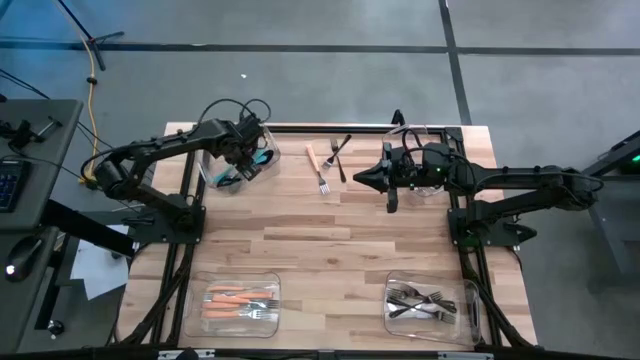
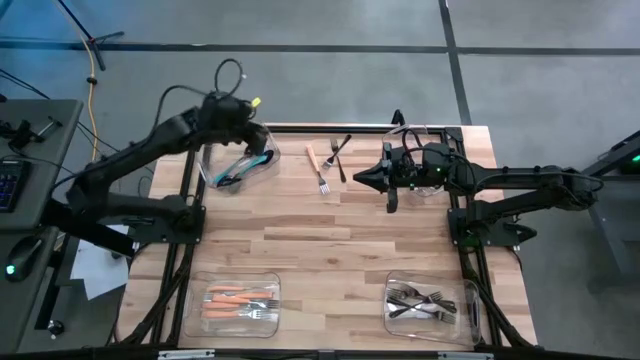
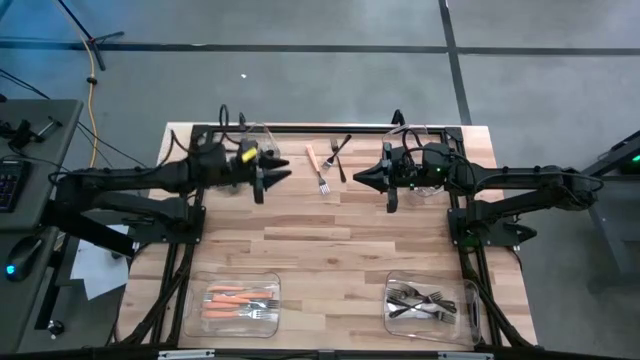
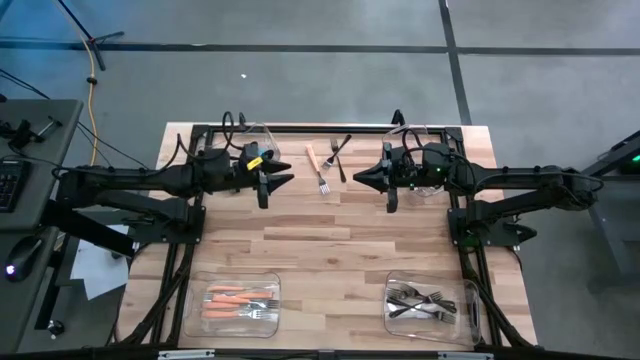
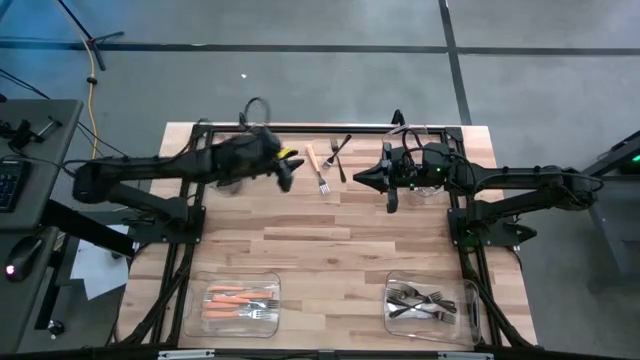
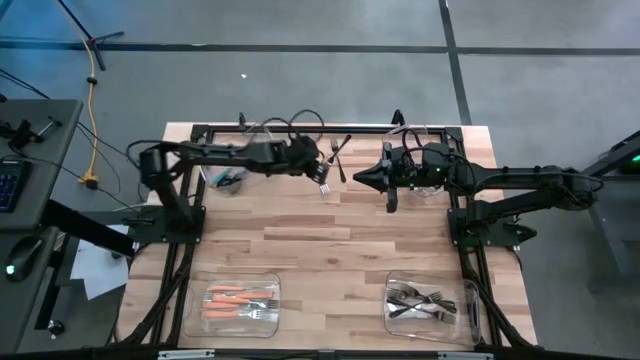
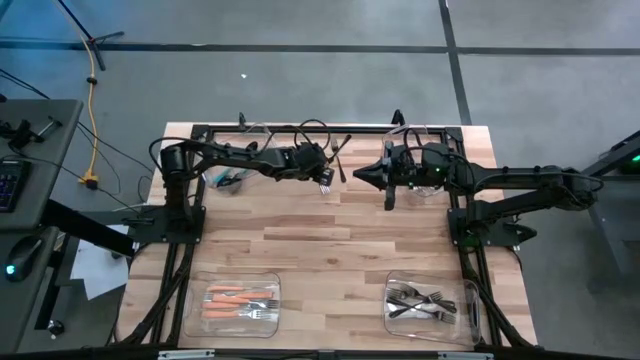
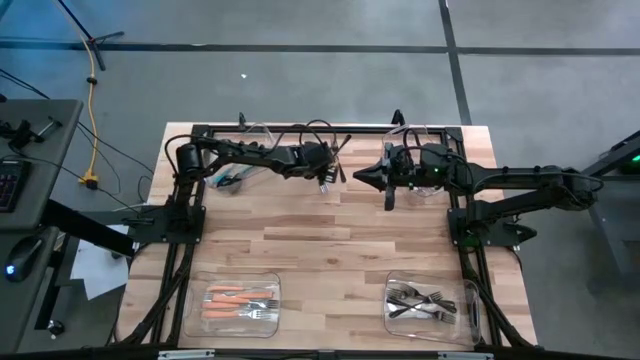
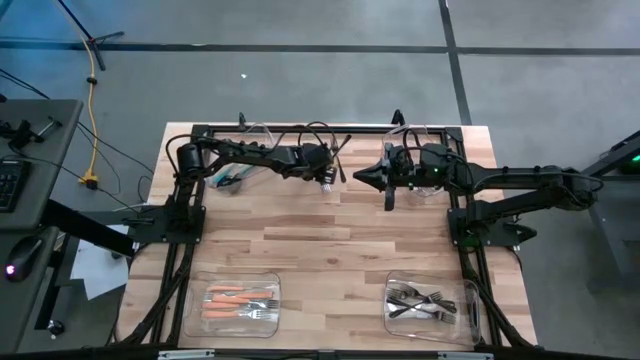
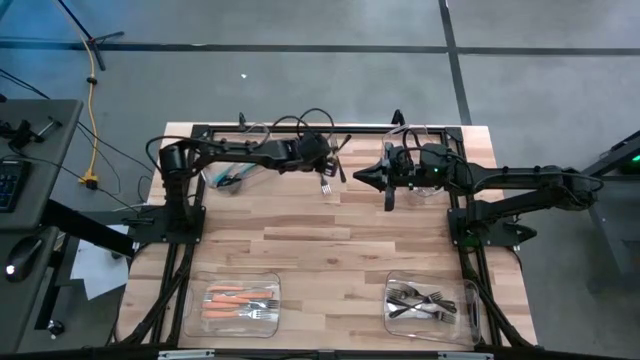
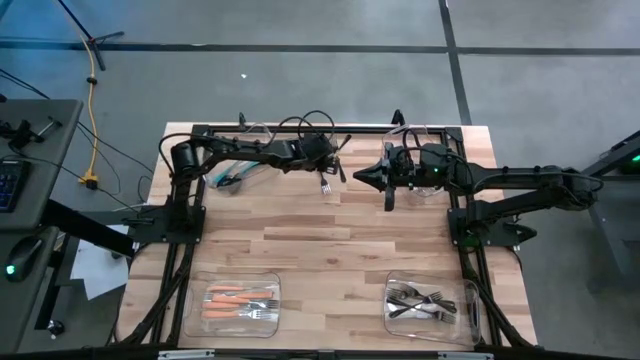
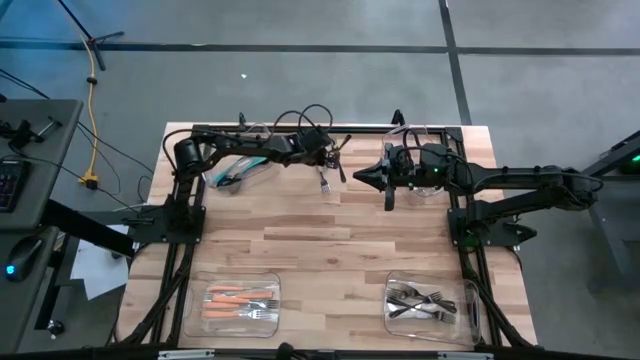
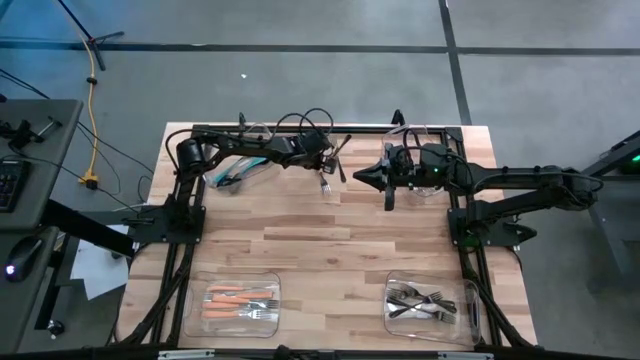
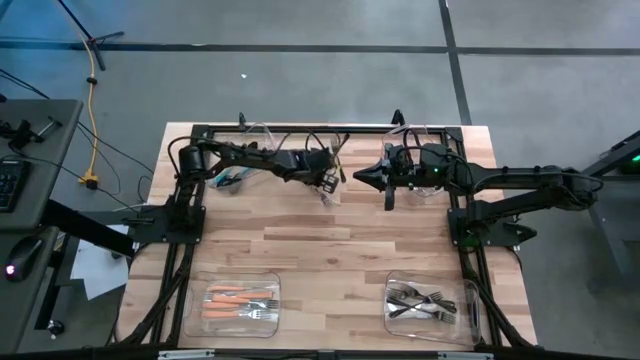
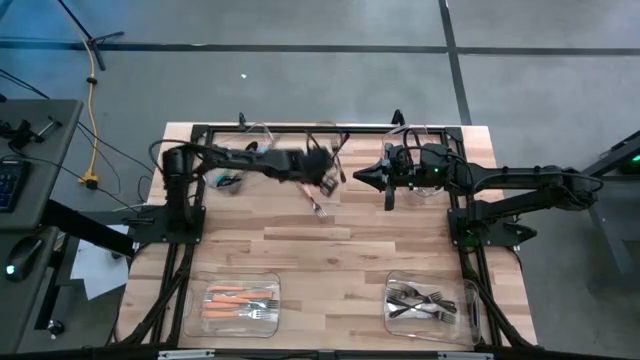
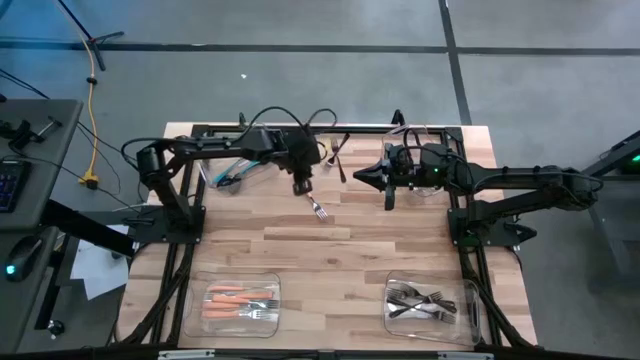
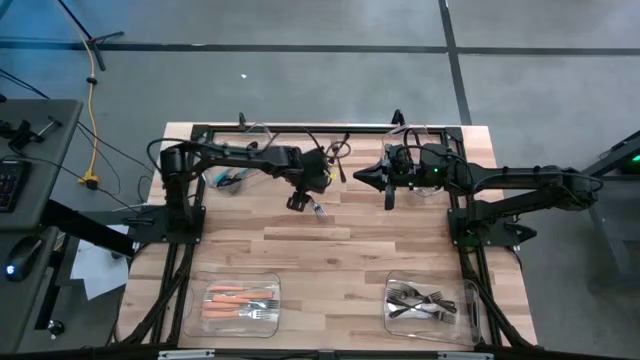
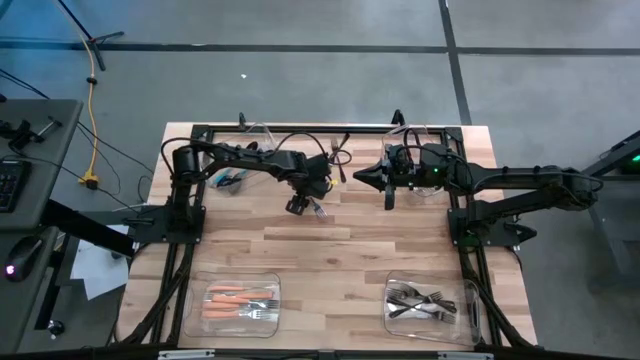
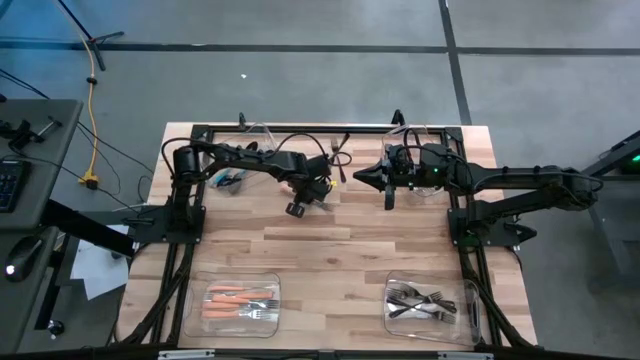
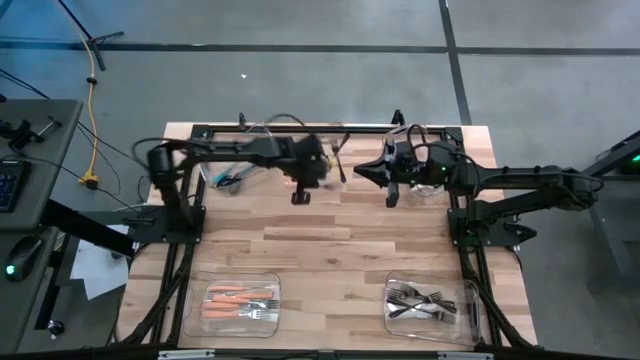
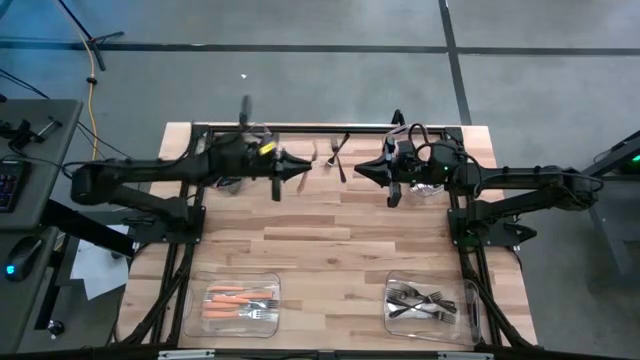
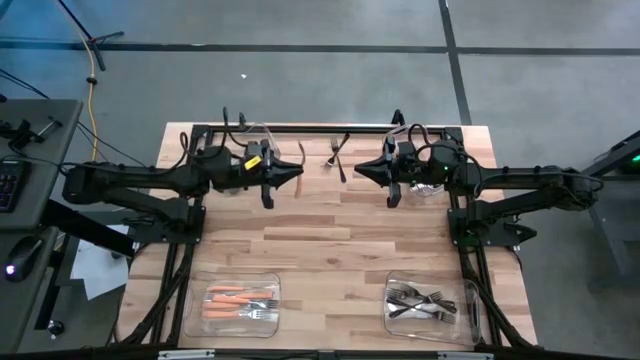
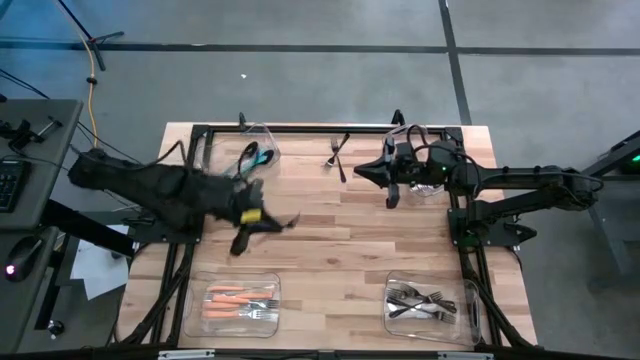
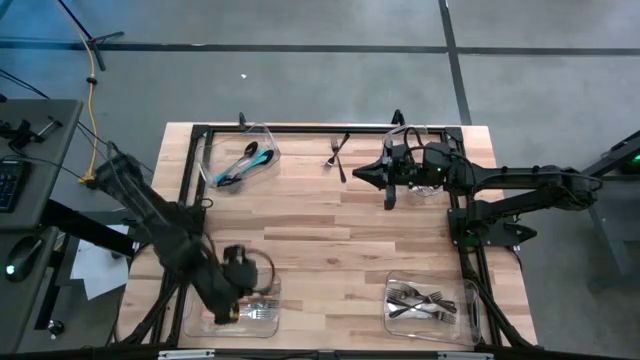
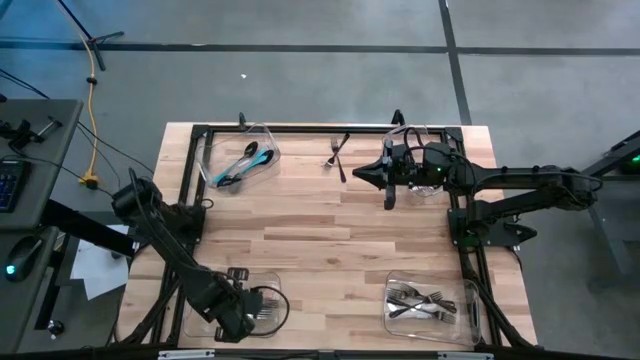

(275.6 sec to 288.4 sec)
Task: Sort silverware by color (type)
Put the light orange fork into the bottom left transparent bin

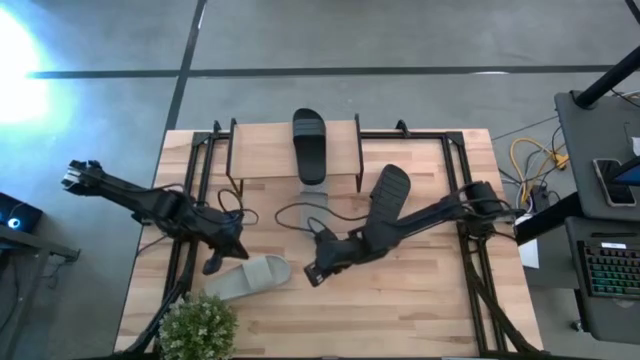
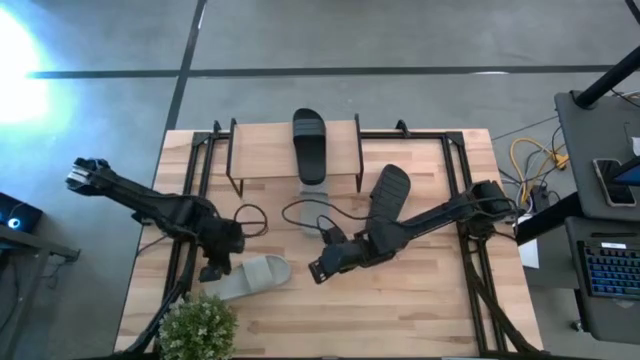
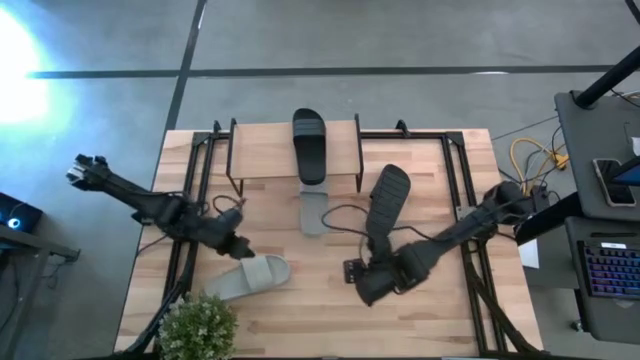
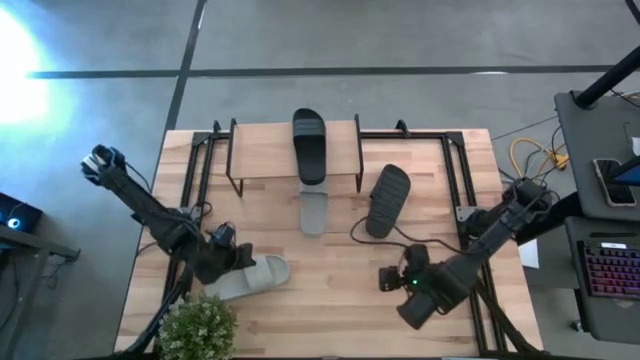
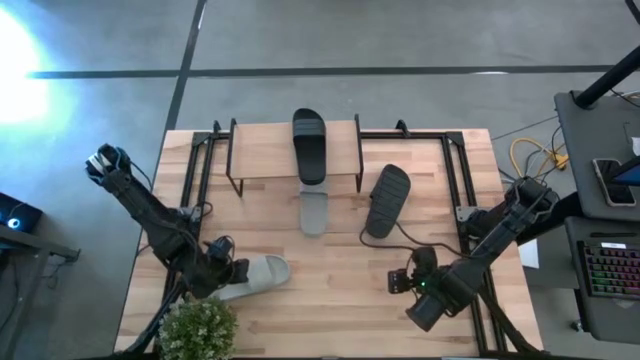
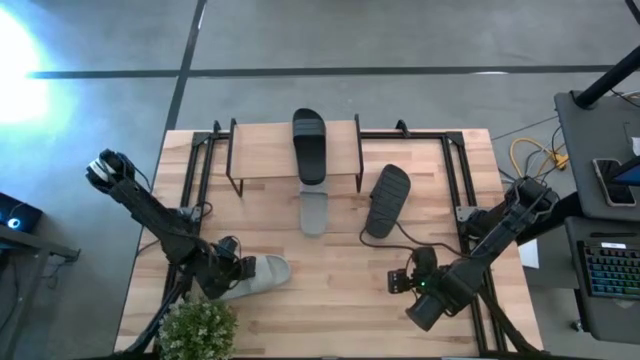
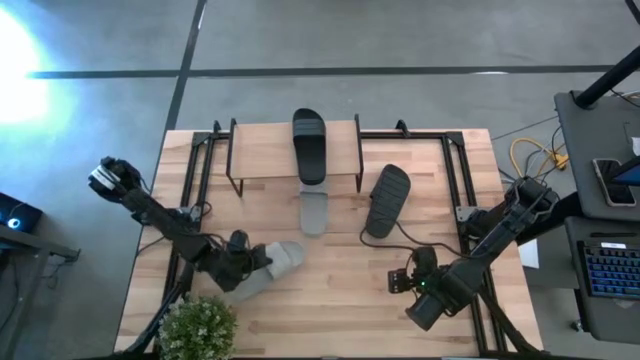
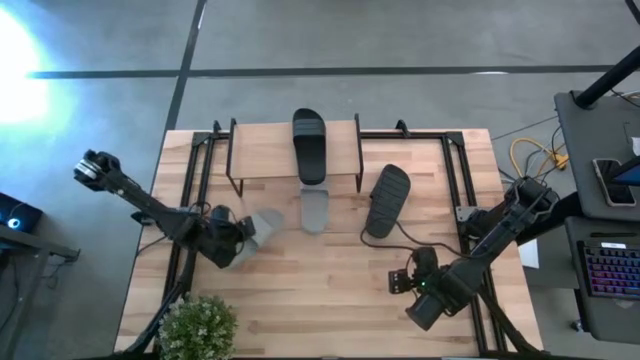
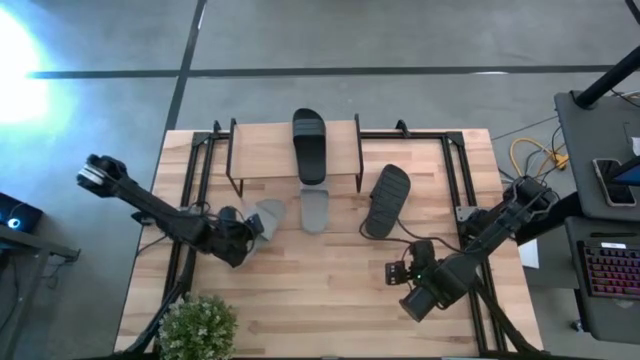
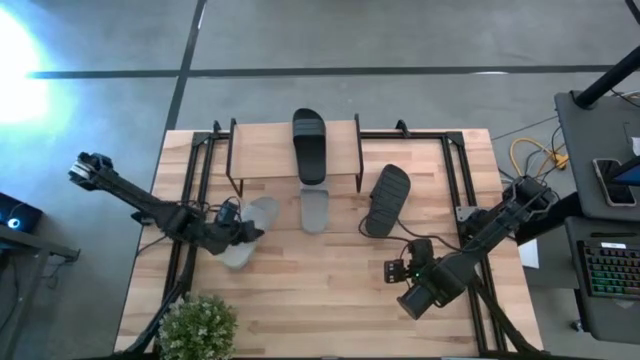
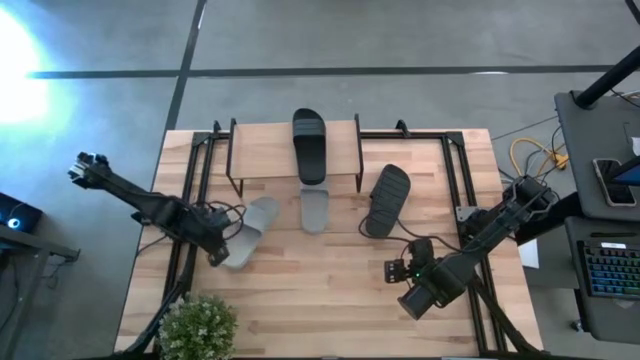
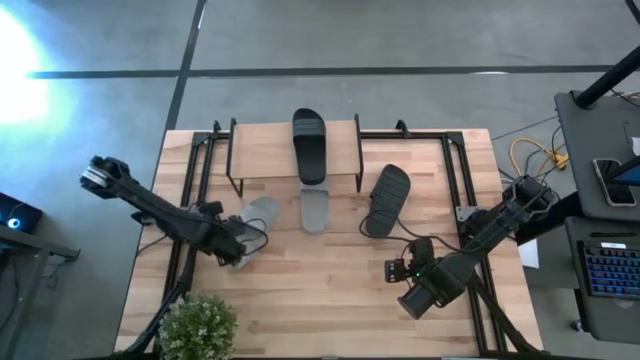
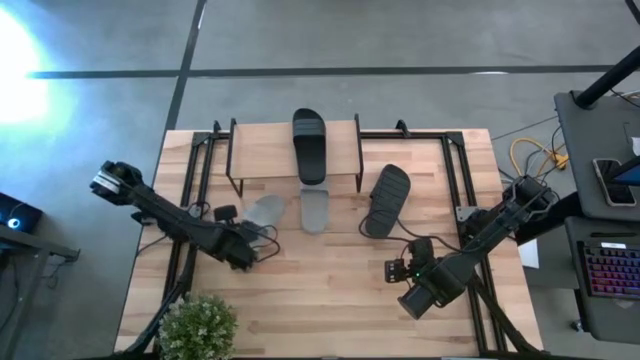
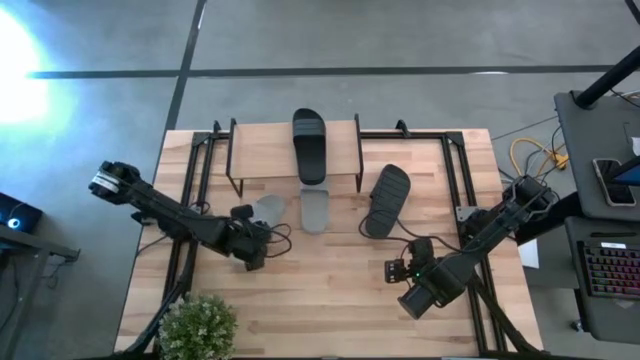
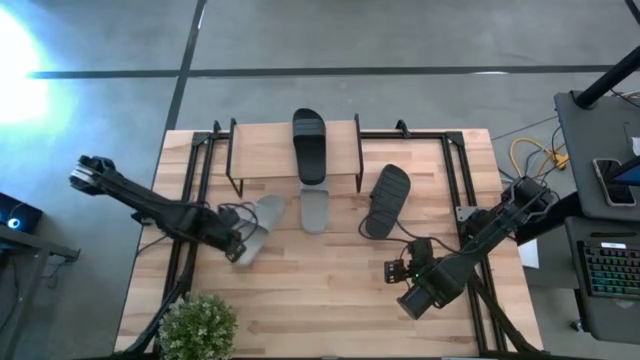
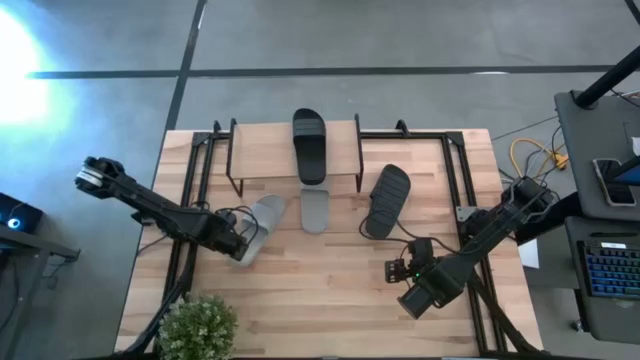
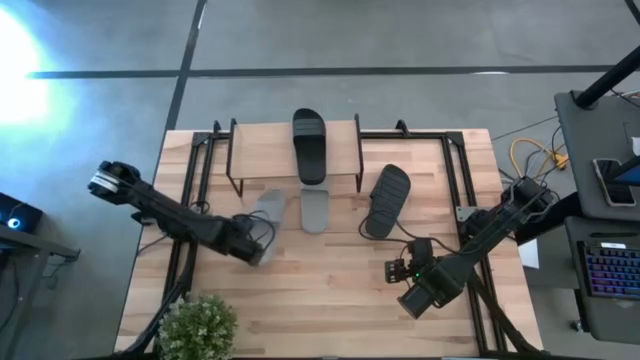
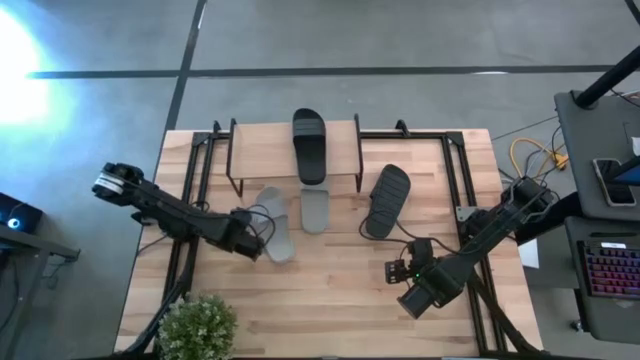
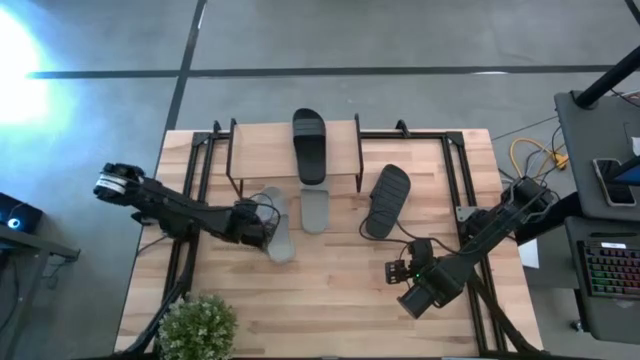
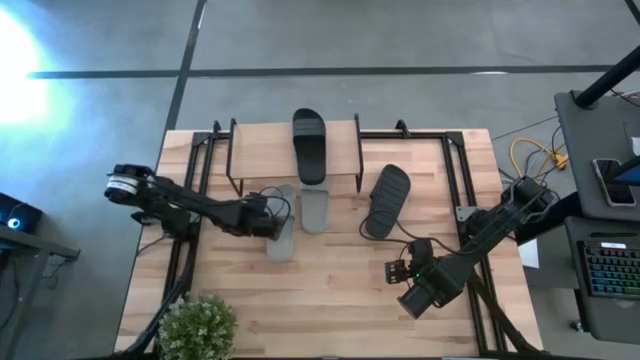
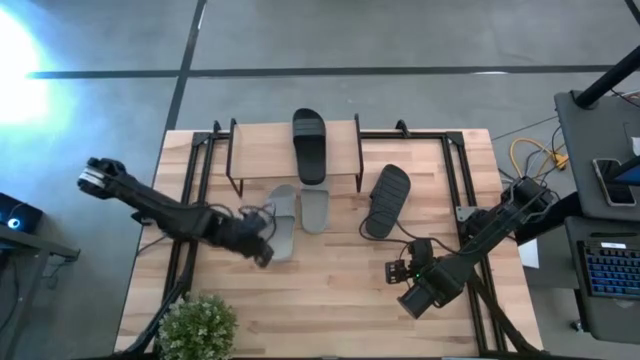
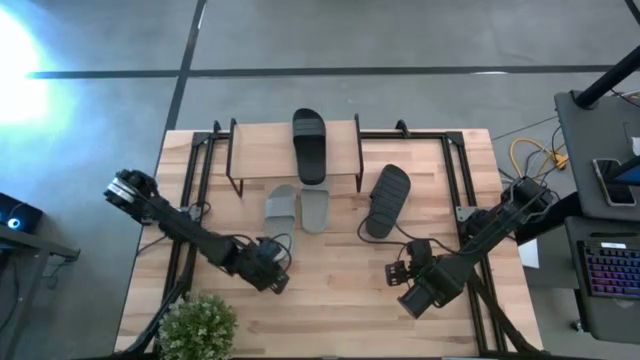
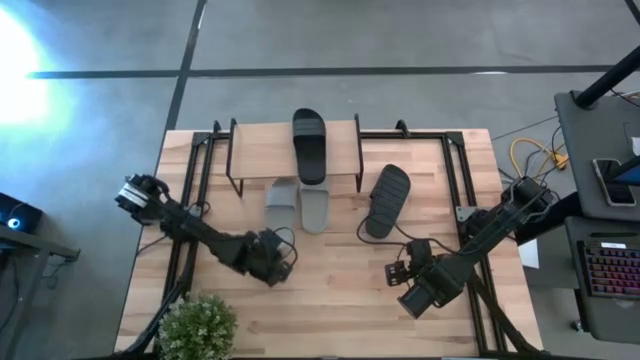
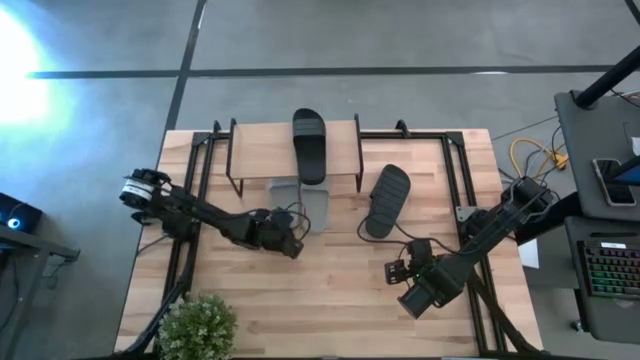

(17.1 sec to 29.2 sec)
Task: Pick and place slides into the shelf
Put the bottom gray slide under the shelf
